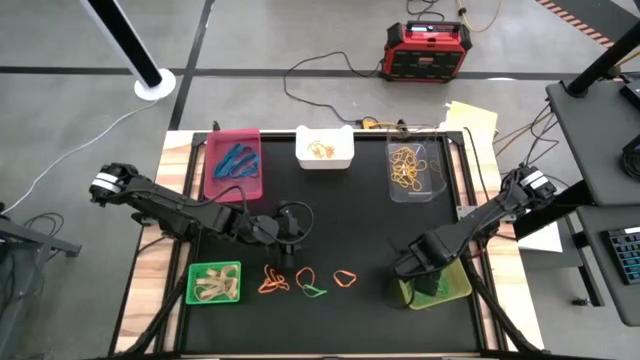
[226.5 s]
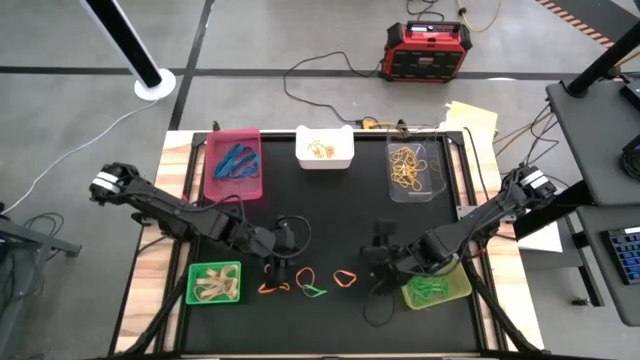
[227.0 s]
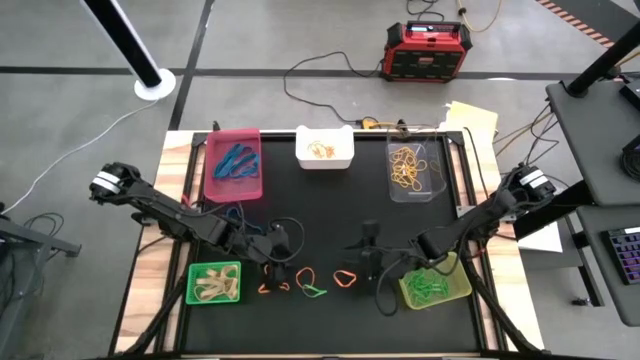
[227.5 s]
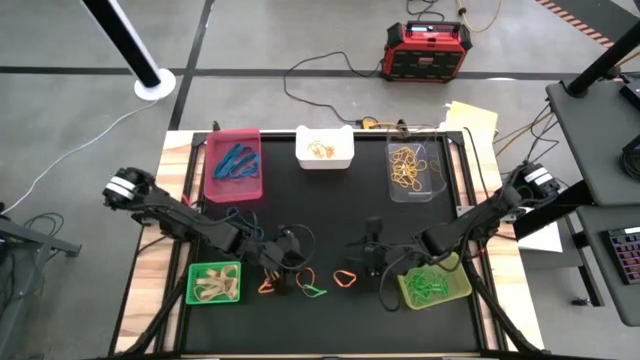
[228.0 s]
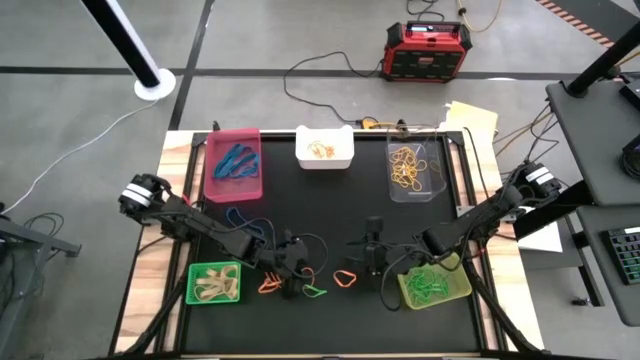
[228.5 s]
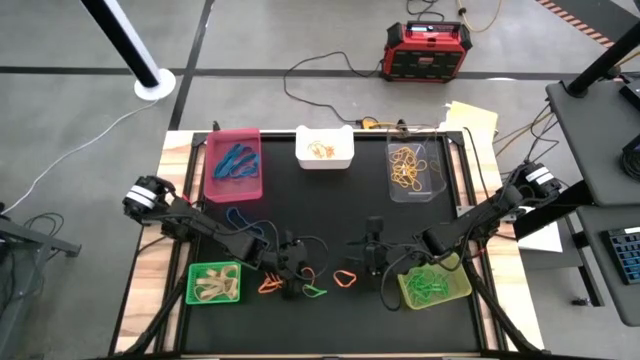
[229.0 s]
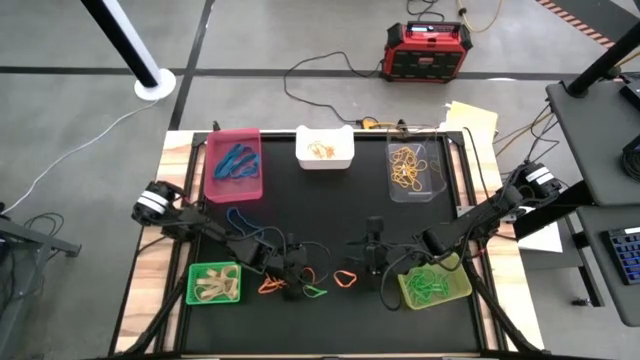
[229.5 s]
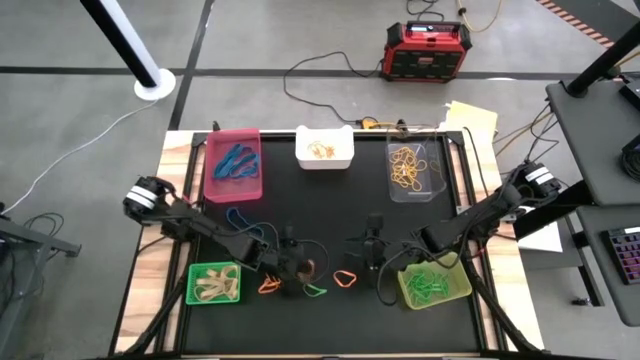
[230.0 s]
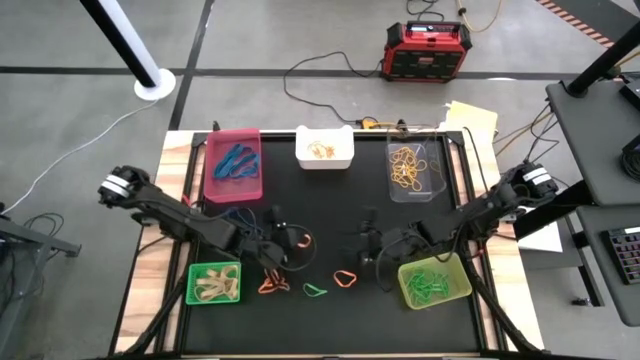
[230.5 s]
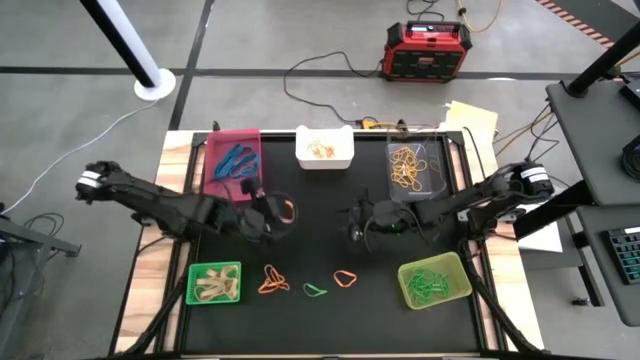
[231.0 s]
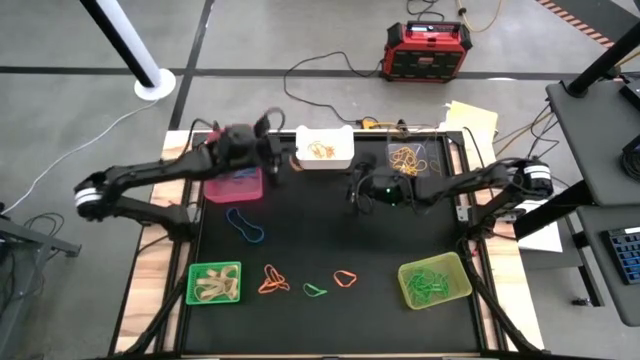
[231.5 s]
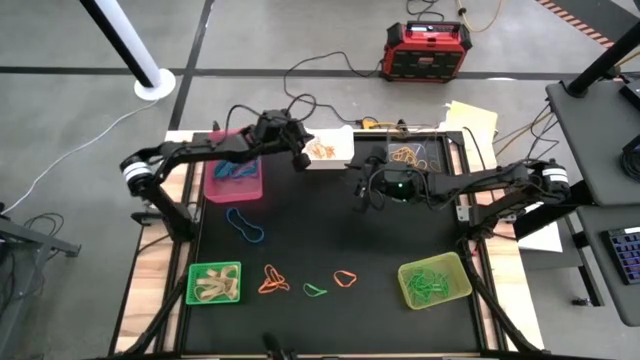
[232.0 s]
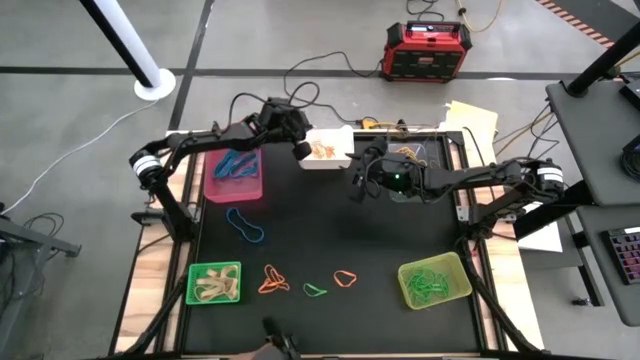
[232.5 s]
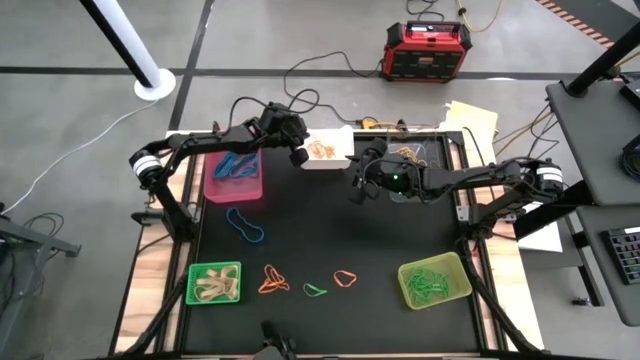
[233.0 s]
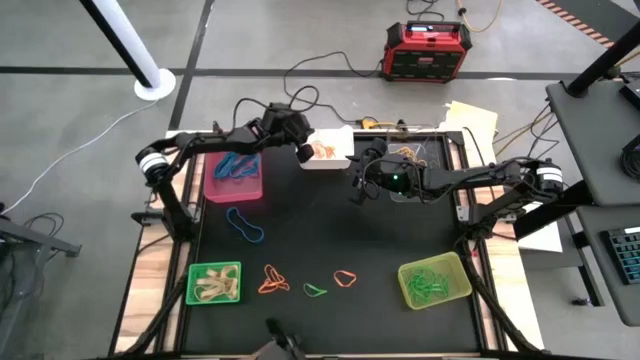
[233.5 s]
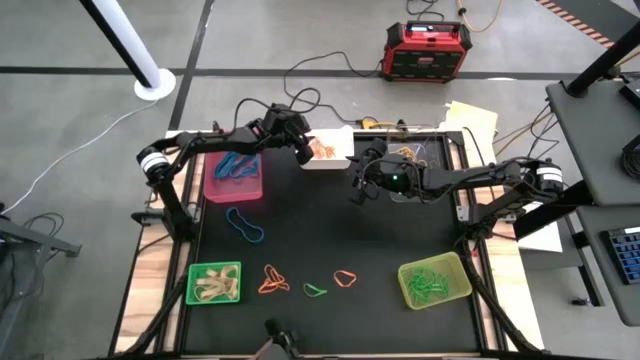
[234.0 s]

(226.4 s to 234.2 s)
Task: Sort rubber bands into baskets
Put the orange rubber band into the white bin

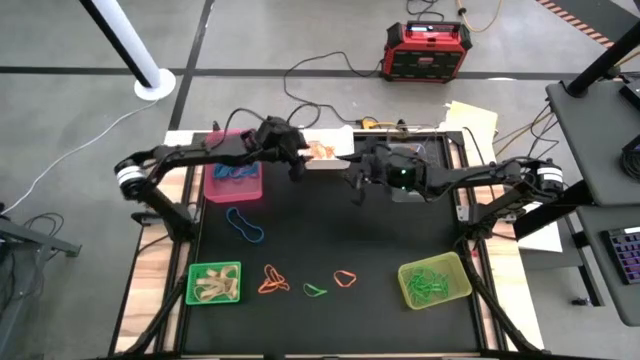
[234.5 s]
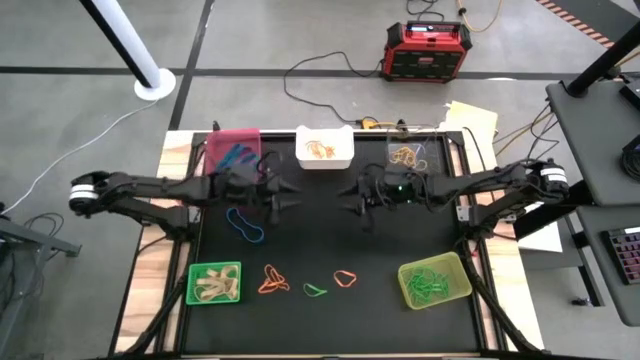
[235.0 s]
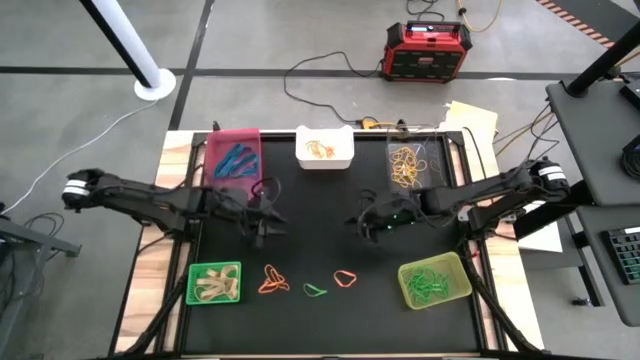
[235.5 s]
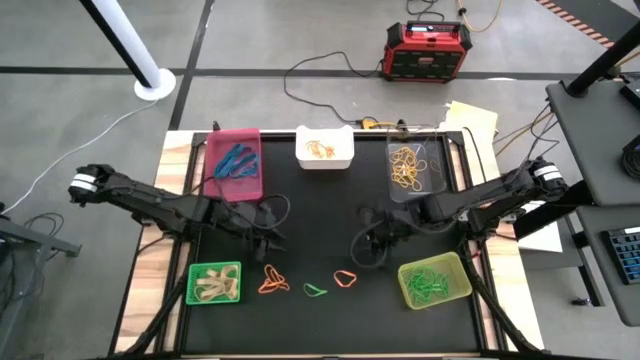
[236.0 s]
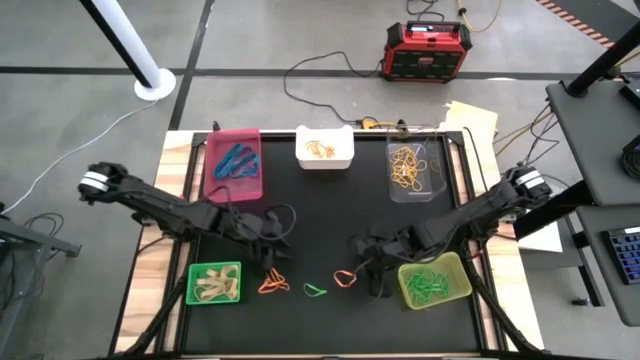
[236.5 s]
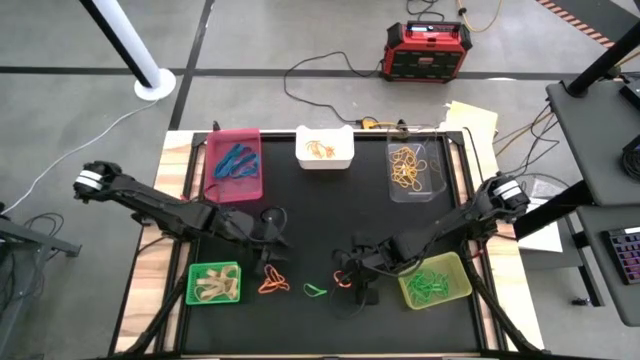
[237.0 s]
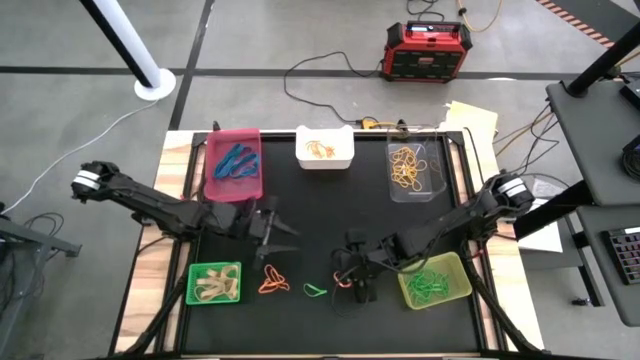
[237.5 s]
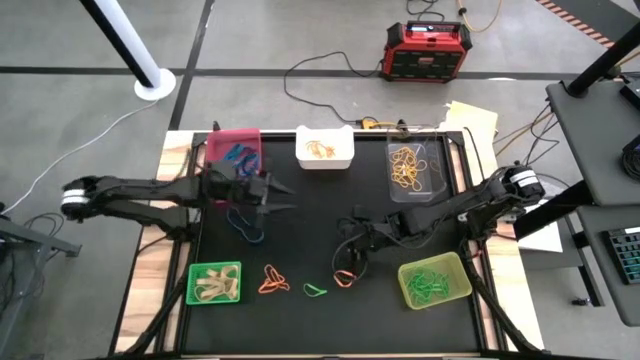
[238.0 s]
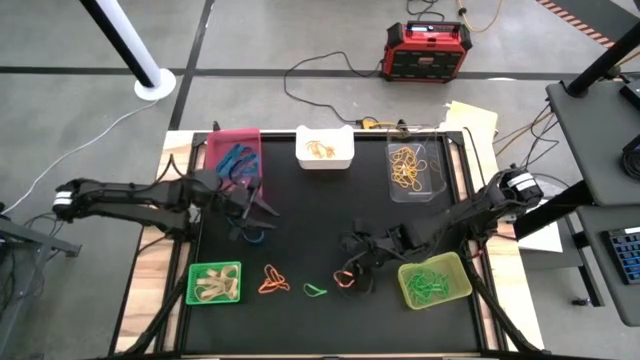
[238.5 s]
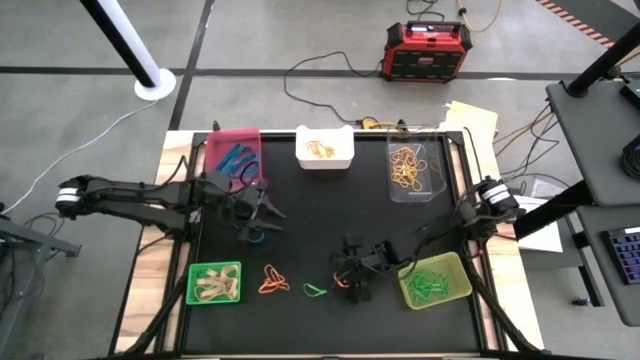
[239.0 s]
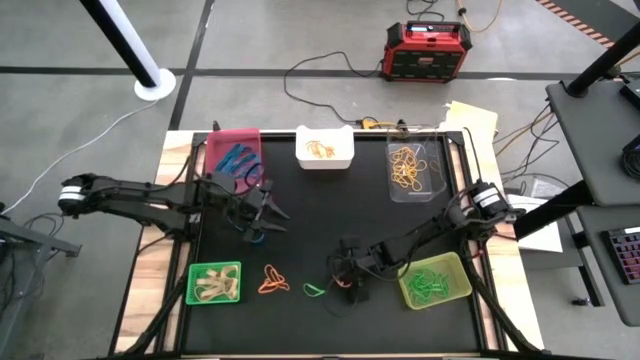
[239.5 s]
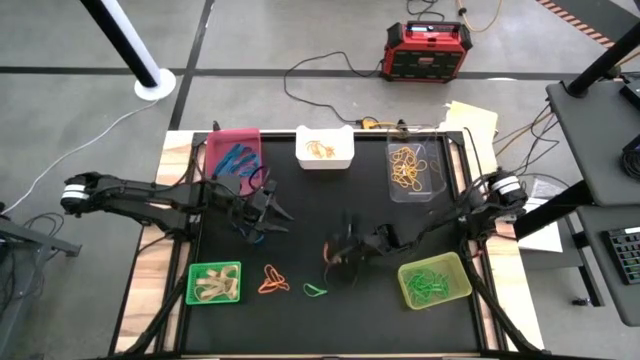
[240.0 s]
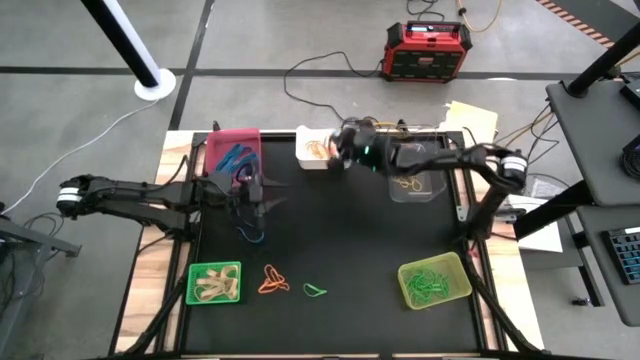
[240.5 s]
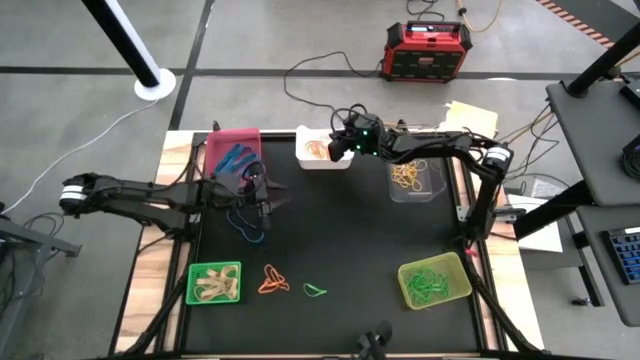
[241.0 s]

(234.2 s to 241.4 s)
Put the orange rubber band into the white bin

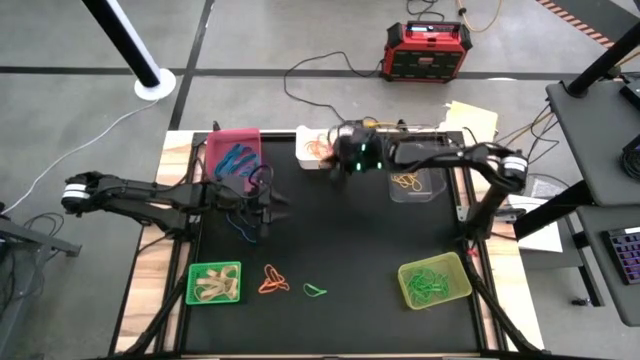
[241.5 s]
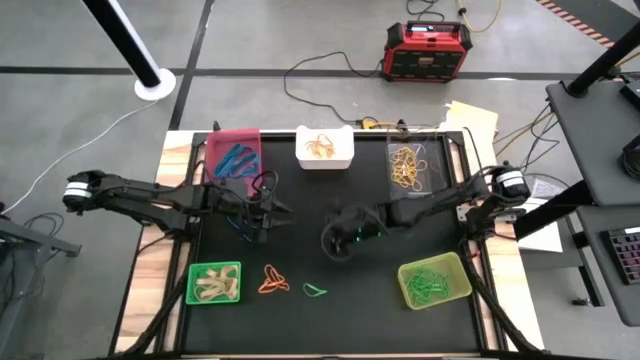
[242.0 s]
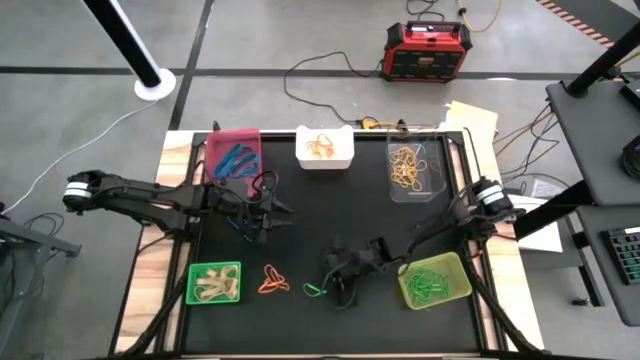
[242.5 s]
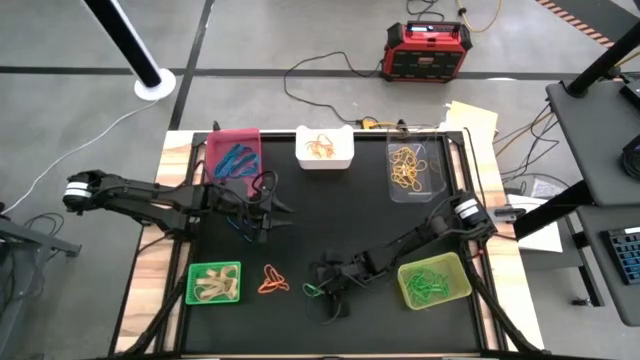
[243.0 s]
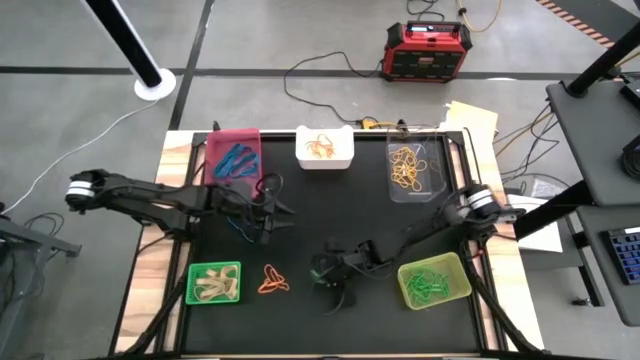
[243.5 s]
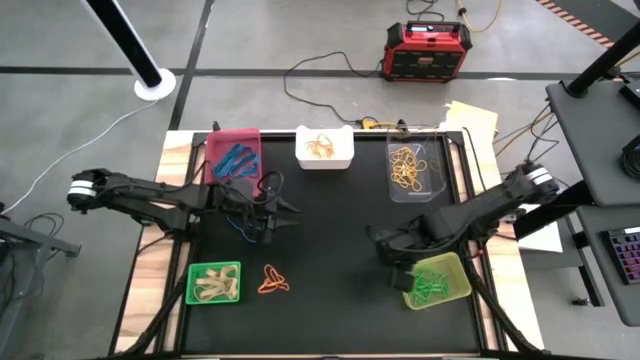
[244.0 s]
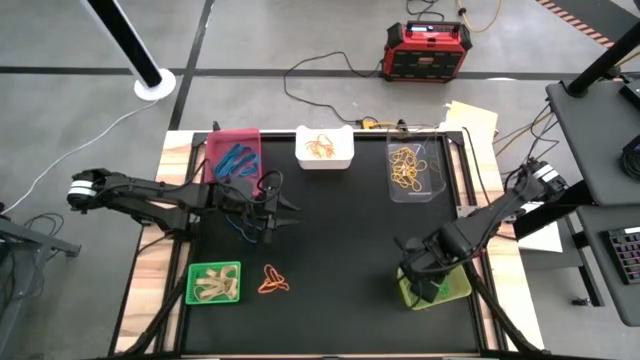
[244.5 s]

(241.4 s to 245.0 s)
Put the green rubber band into the yellow bin

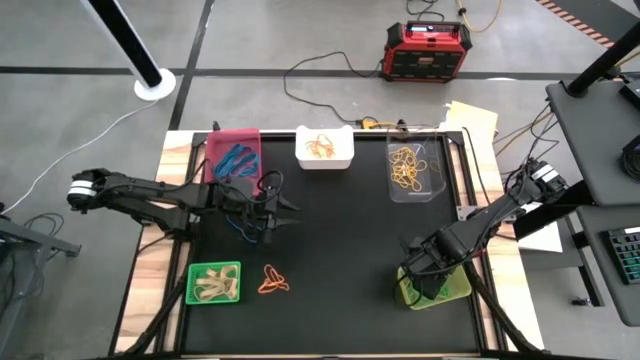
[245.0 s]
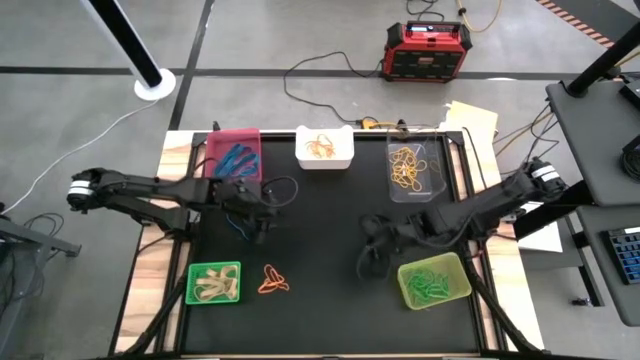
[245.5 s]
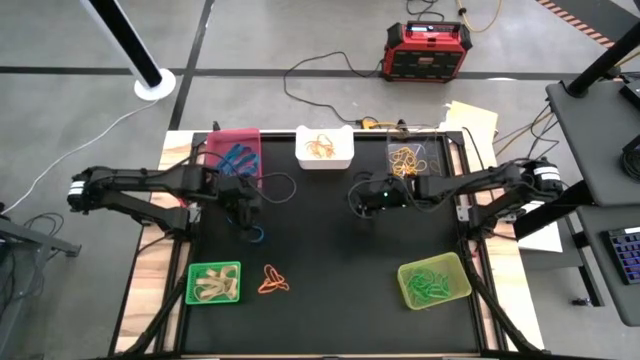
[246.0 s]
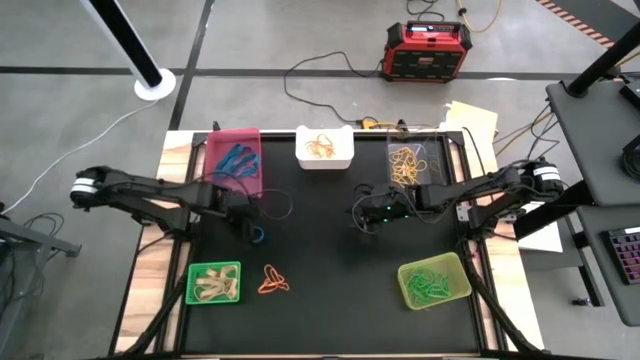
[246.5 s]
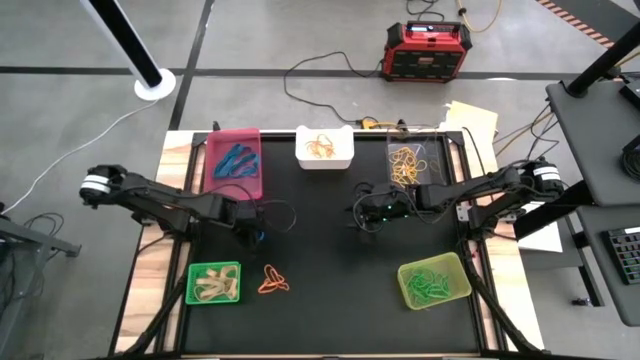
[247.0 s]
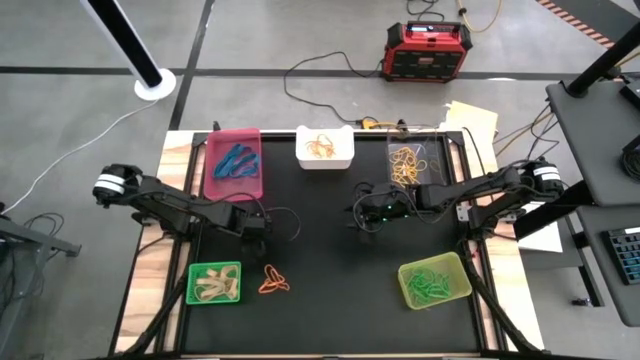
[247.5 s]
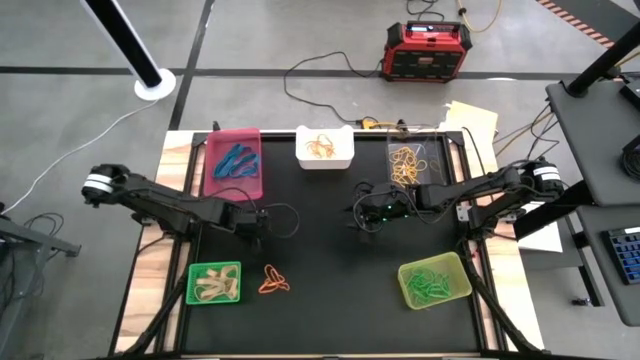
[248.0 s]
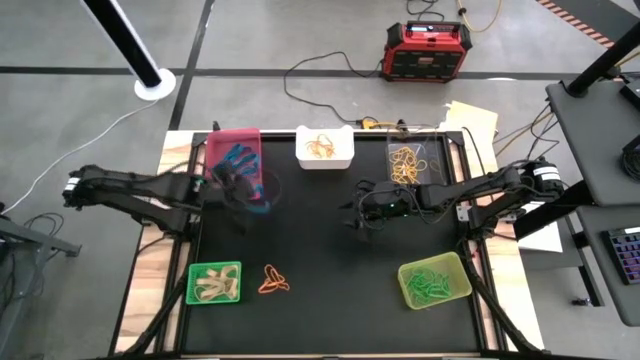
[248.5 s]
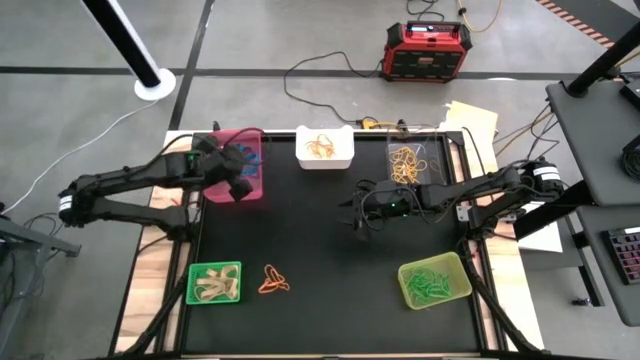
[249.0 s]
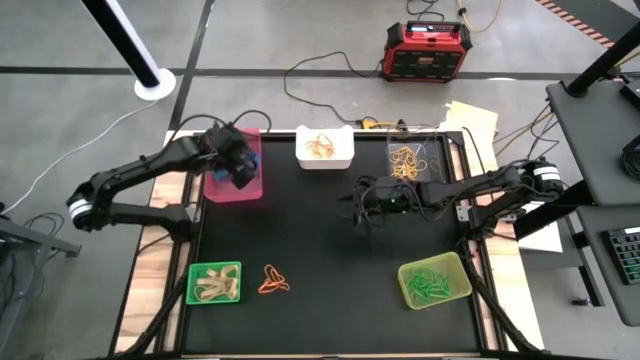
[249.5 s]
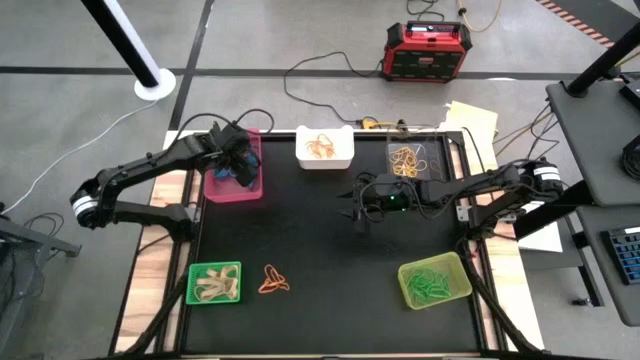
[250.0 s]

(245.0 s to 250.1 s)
Put the blue rubber band into the pink bin
